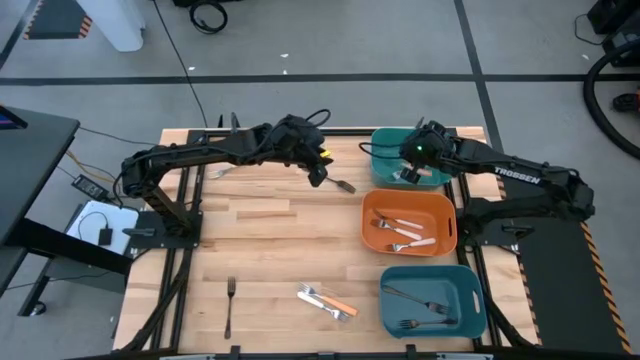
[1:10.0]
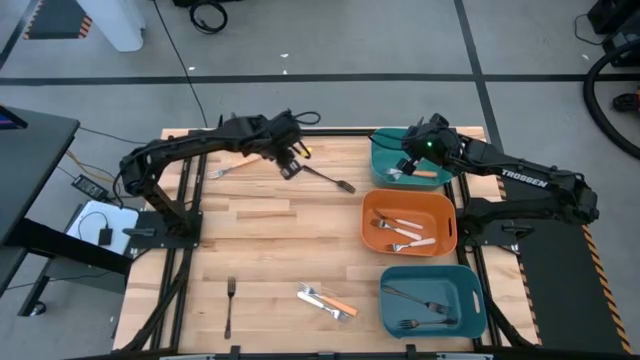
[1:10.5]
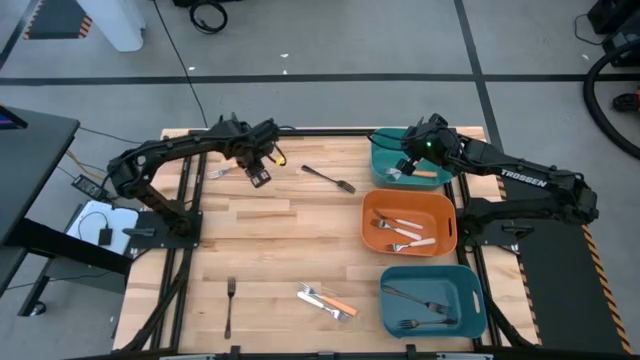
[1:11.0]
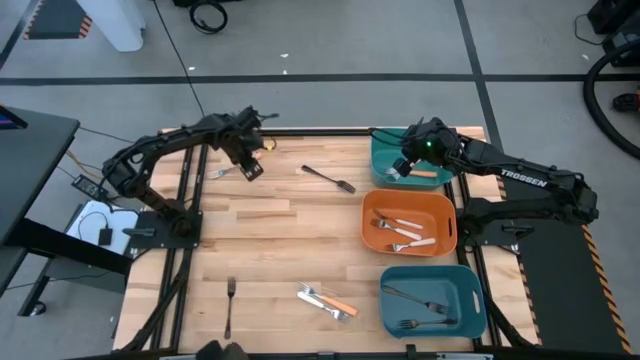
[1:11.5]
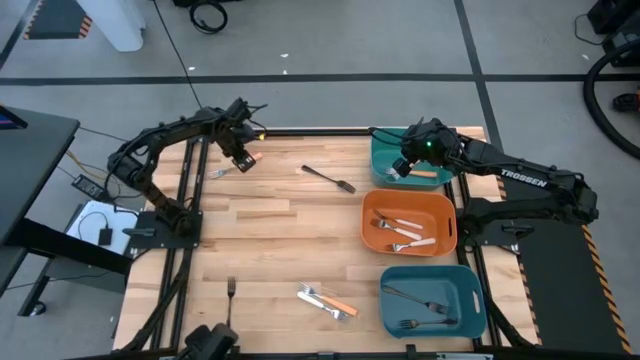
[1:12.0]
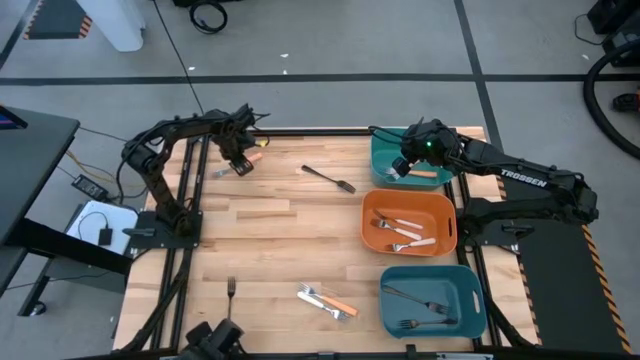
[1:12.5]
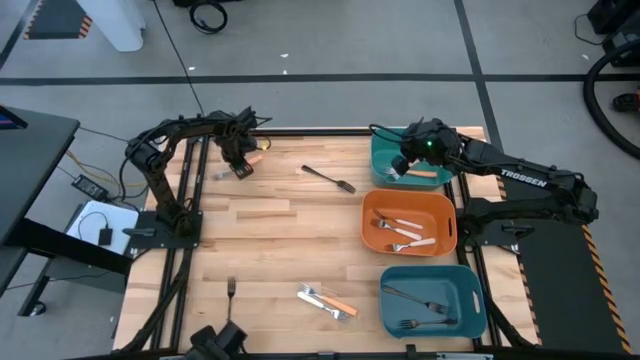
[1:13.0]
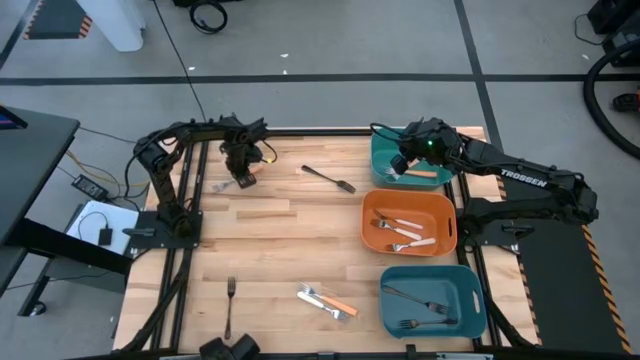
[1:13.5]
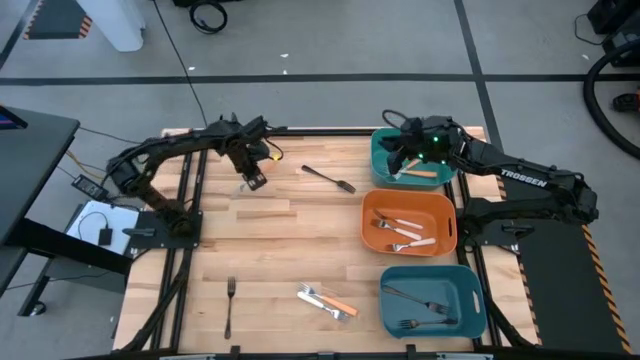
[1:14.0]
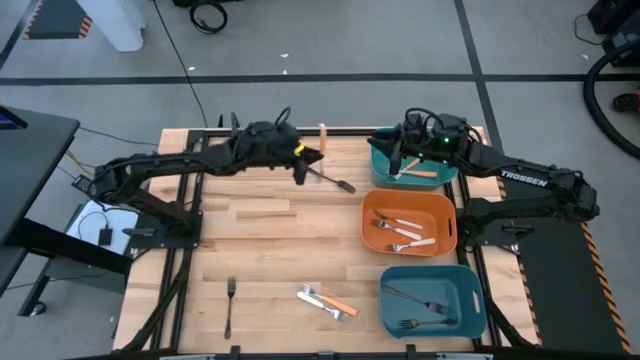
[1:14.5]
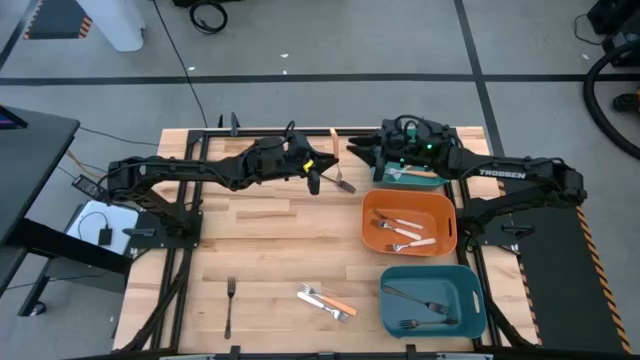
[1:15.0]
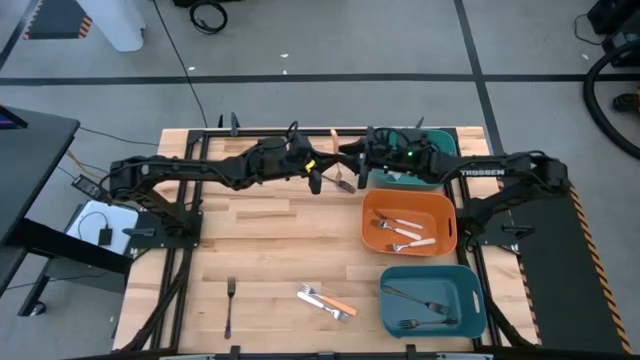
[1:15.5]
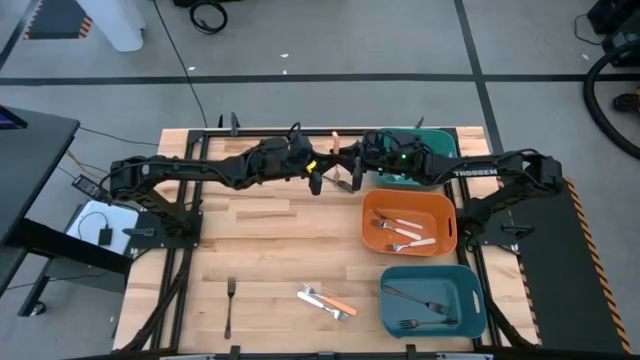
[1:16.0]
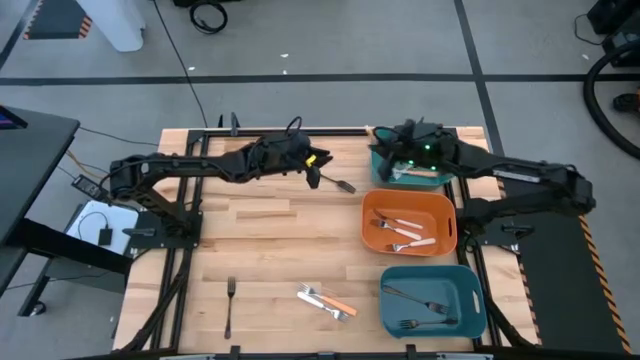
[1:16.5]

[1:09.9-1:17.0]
Task: Sort silverware by color (type)
Put the orange fork into the green bin

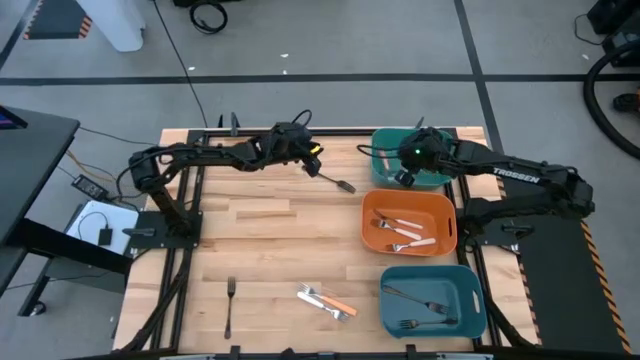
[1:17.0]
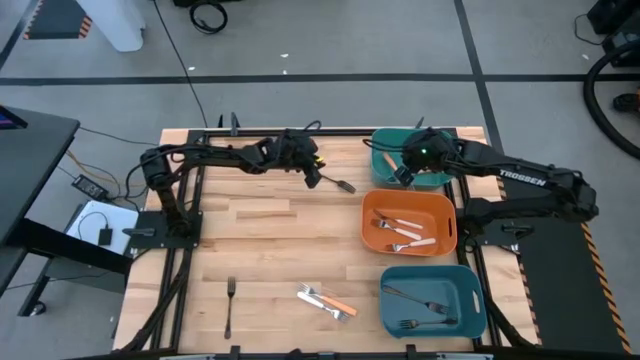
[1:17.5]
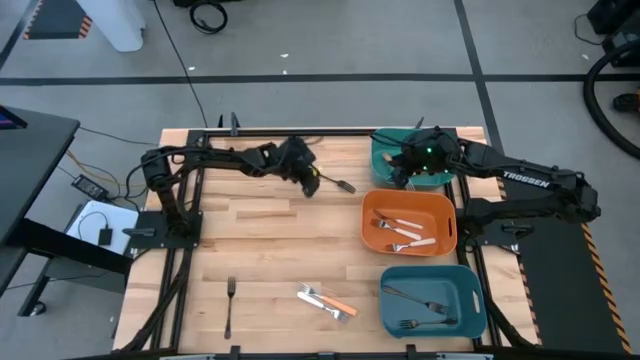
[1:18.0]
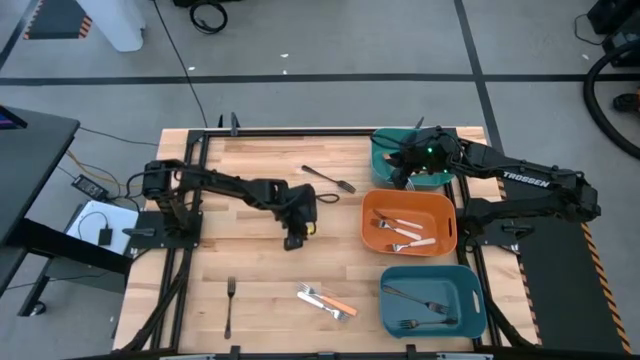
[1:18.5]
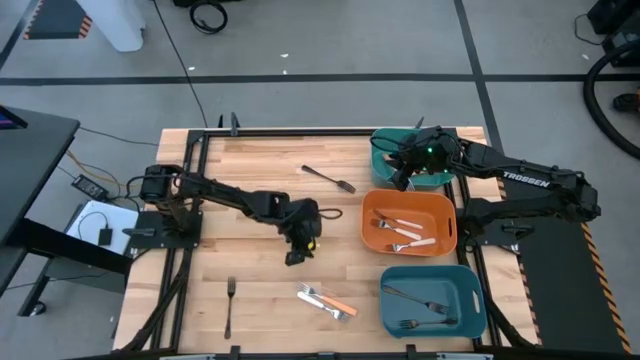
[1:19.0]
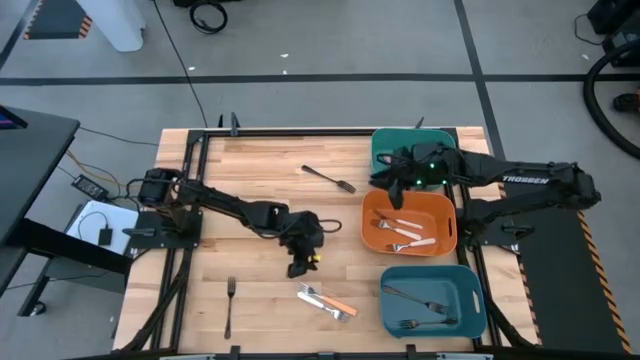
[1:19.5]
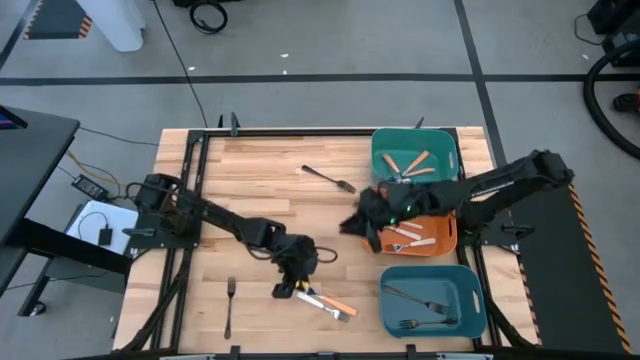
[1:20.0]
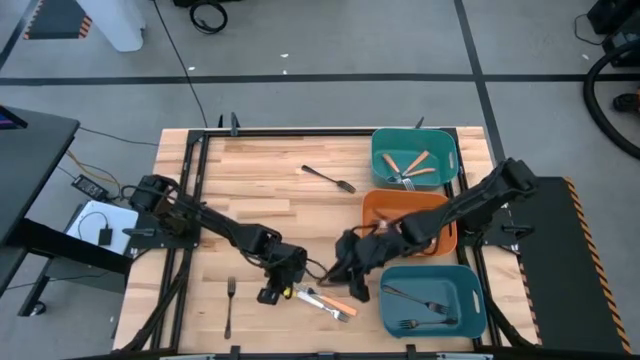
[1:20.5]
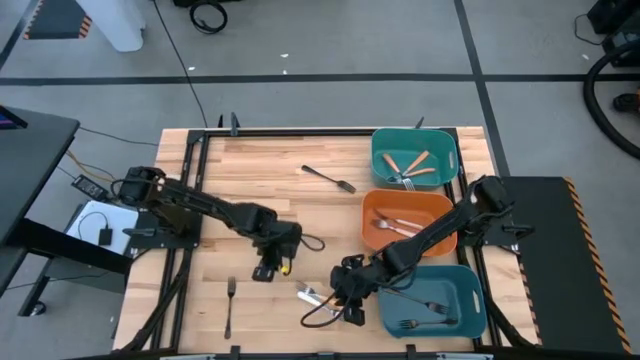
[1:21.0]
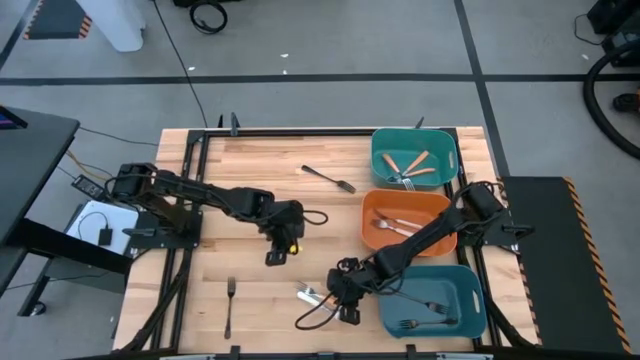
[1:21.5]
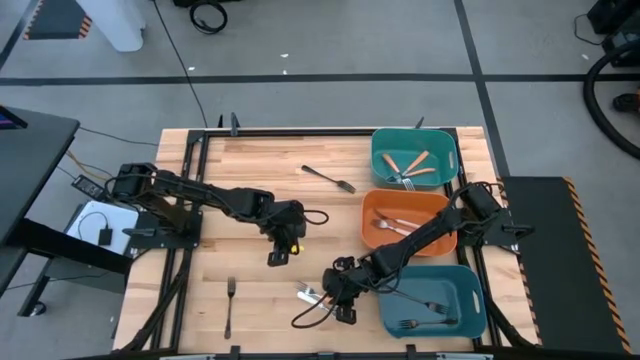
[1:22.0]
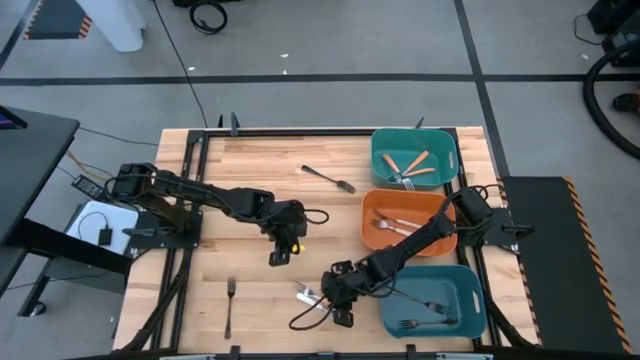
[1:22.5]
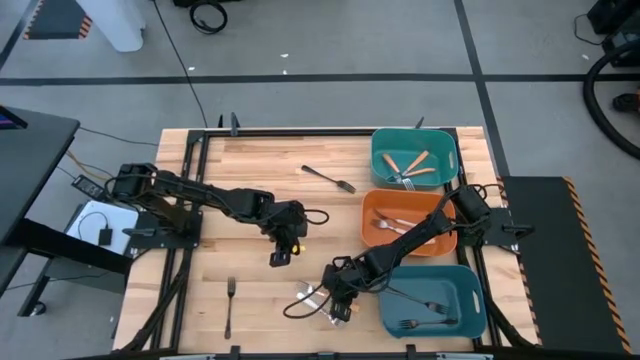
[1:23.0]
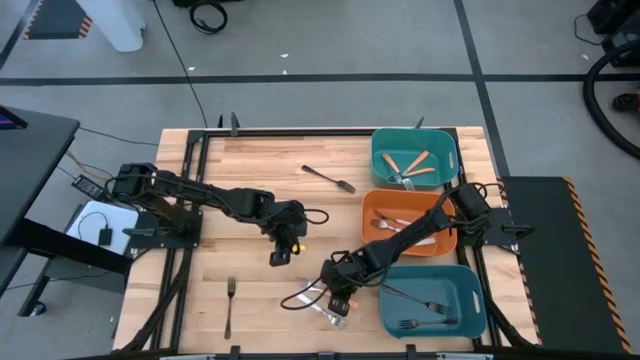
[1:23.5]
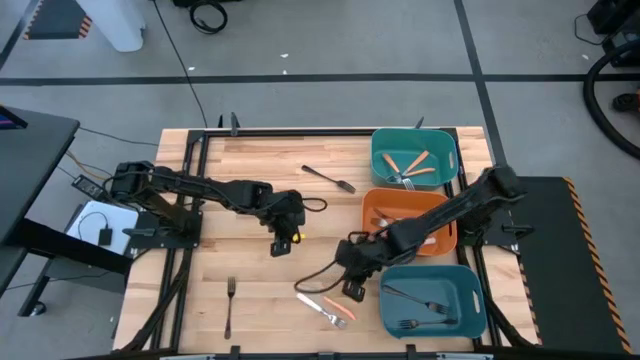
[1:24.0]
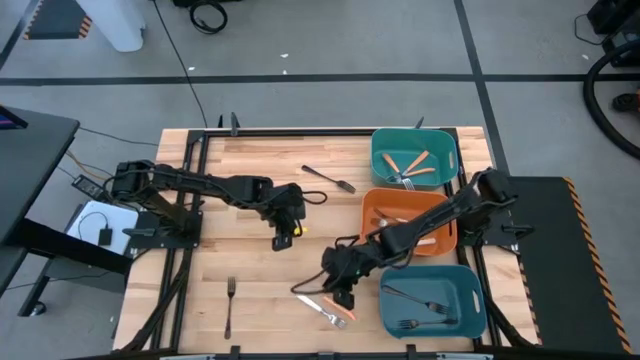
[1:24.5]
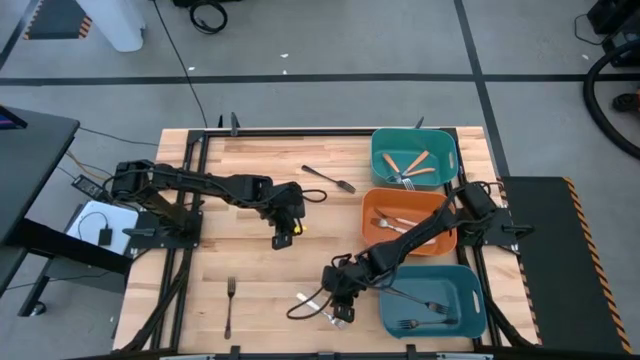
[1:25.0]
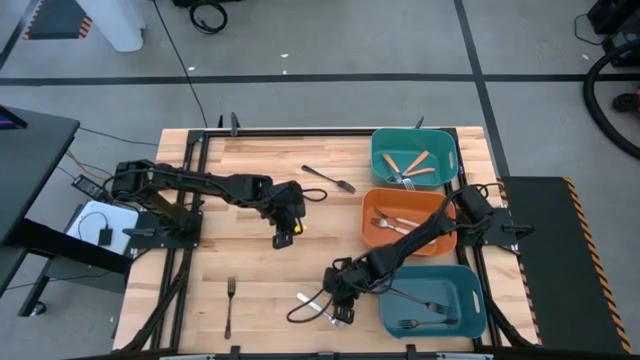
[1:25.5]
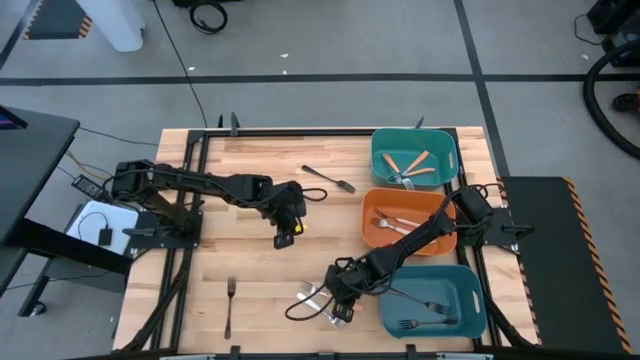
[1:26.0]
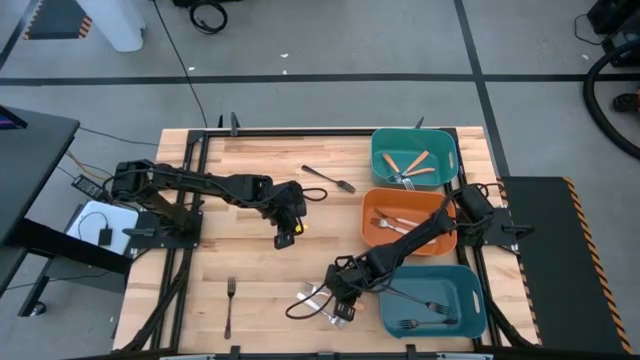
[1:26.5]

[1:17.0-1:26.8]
Put the orange fork into the green bin

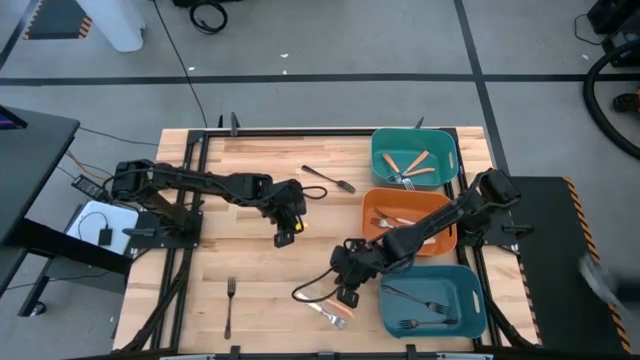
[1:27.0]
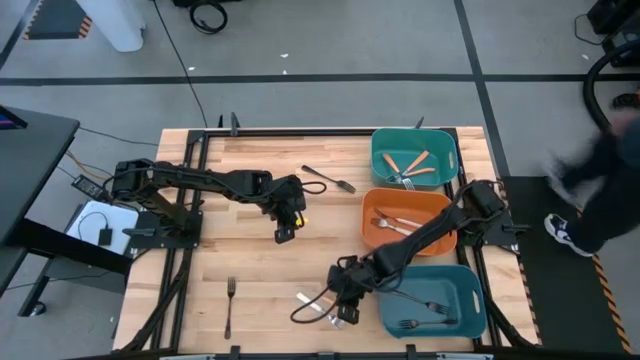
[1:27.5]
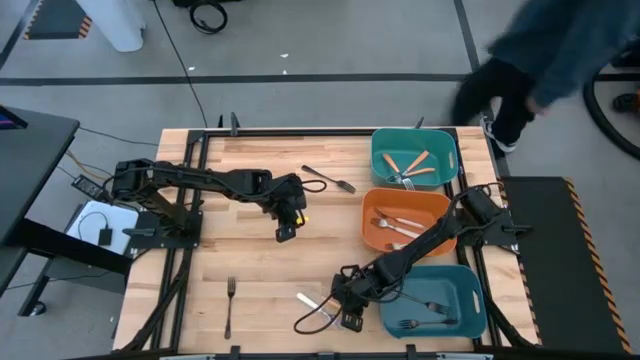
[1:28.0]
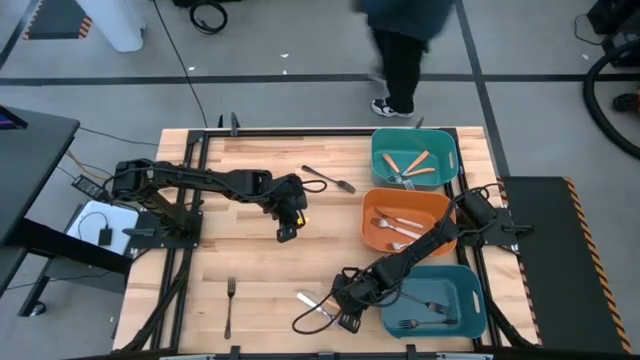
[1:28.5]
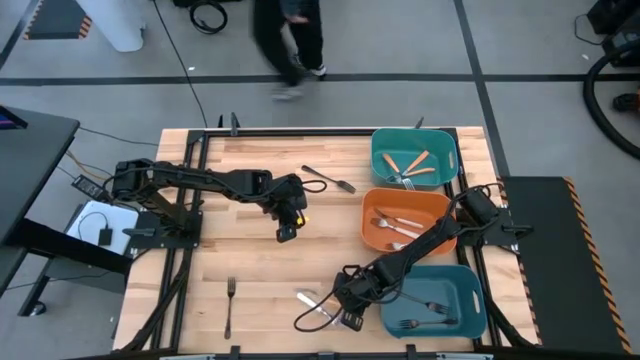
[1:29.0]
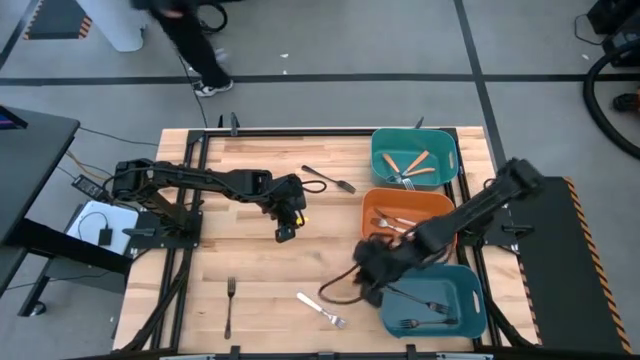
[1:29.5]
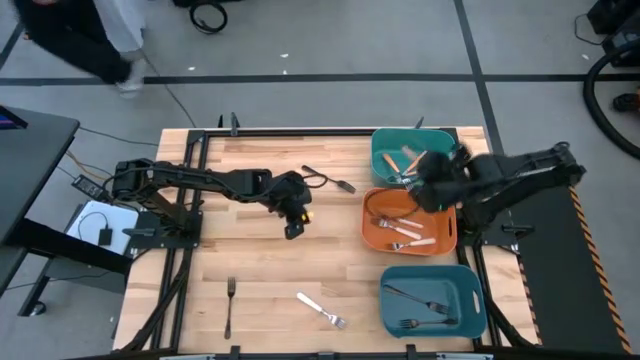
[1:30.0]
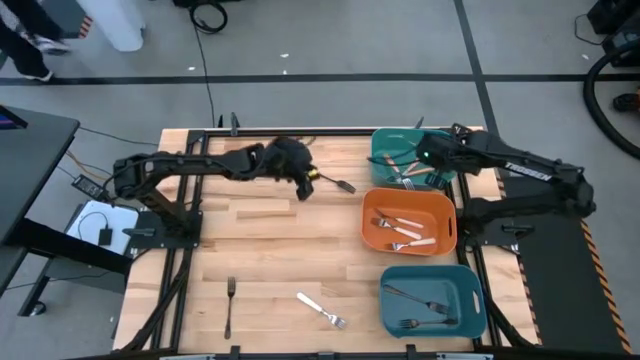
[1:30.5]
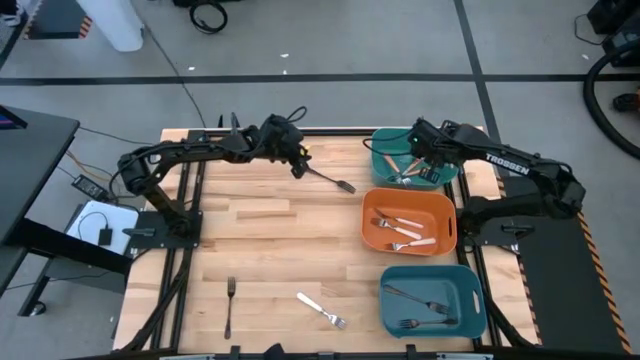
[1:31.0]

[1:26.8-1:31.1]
Put the orange fork into the green bin
